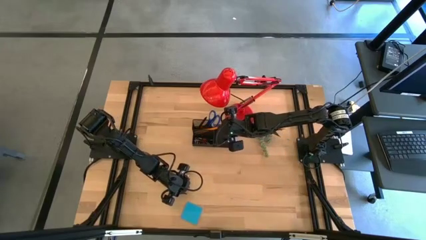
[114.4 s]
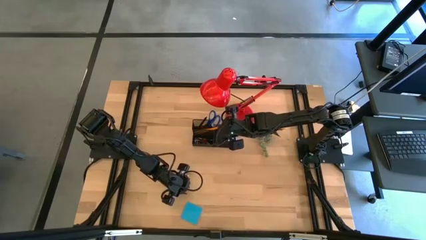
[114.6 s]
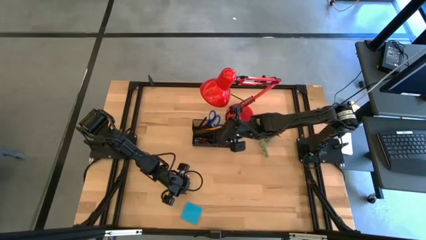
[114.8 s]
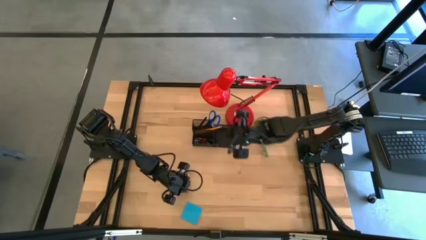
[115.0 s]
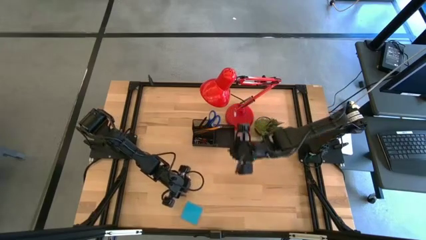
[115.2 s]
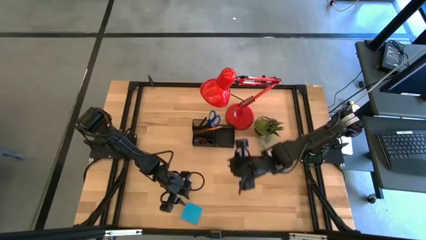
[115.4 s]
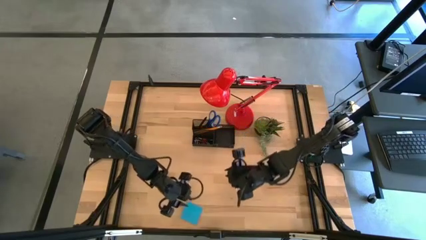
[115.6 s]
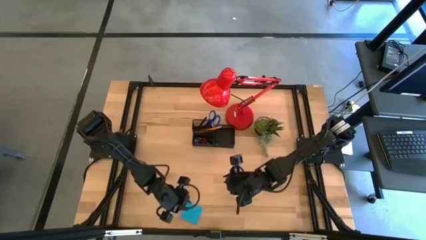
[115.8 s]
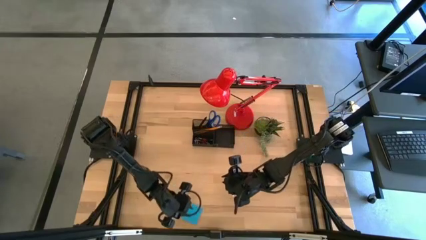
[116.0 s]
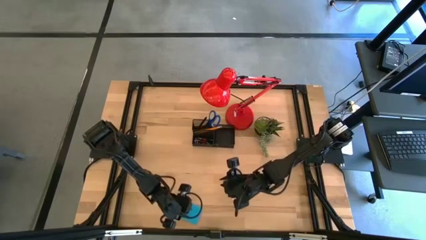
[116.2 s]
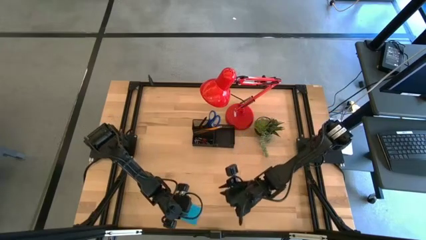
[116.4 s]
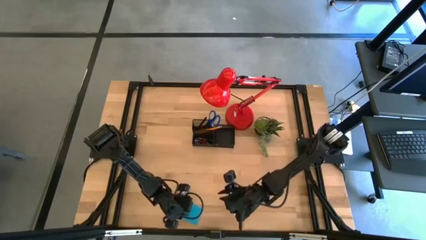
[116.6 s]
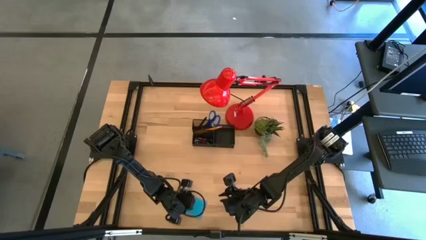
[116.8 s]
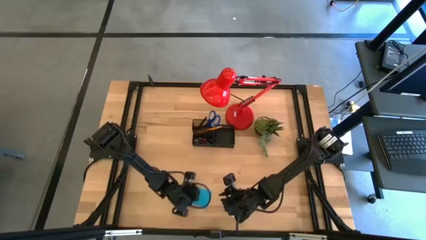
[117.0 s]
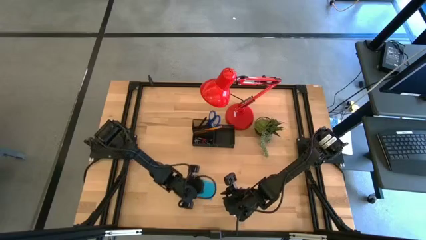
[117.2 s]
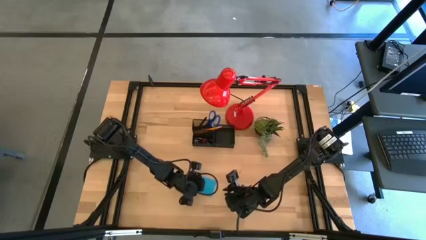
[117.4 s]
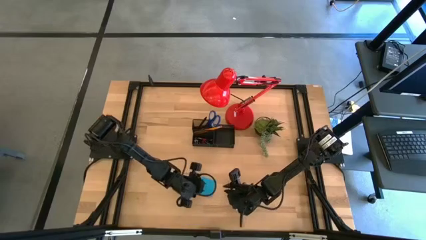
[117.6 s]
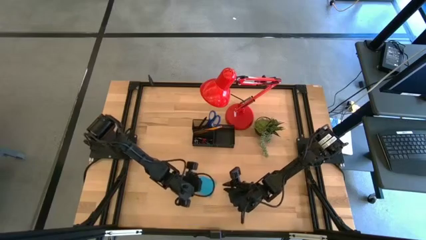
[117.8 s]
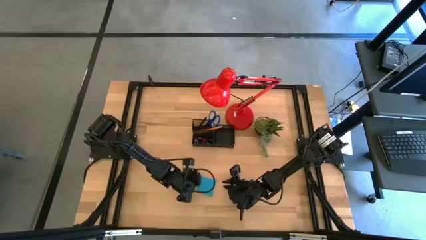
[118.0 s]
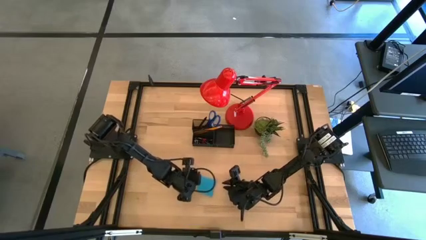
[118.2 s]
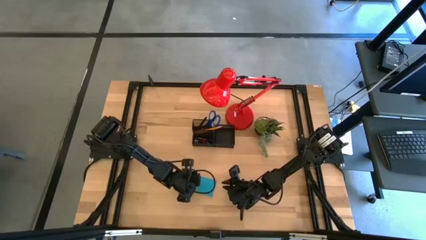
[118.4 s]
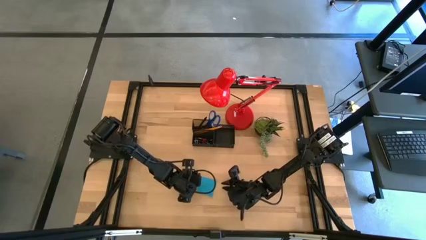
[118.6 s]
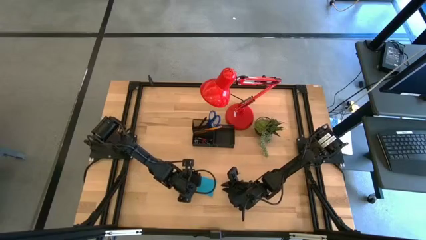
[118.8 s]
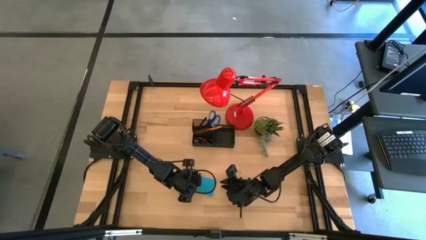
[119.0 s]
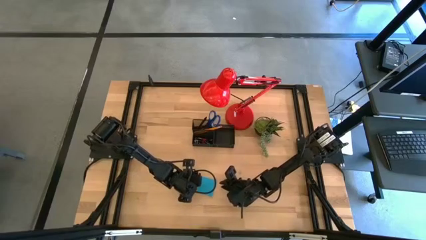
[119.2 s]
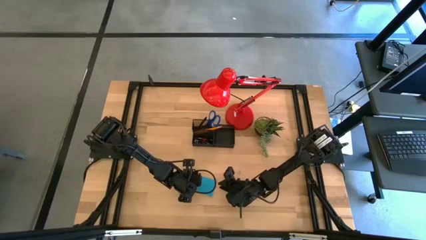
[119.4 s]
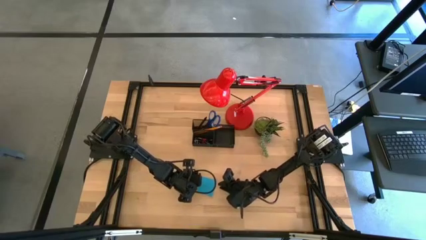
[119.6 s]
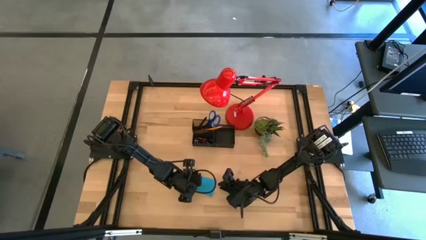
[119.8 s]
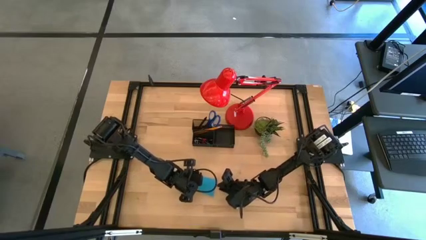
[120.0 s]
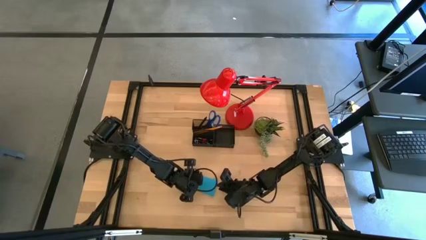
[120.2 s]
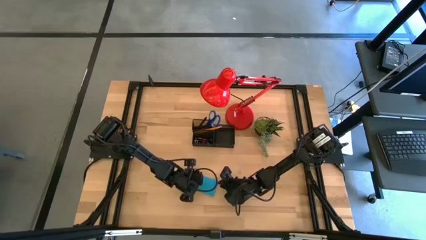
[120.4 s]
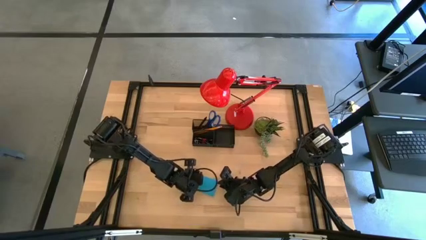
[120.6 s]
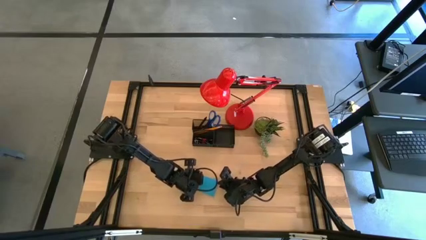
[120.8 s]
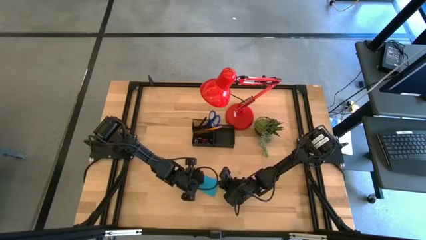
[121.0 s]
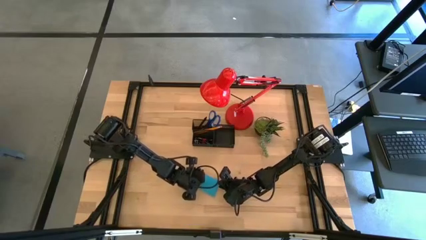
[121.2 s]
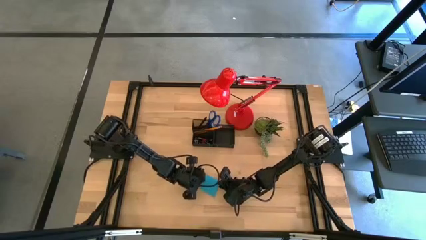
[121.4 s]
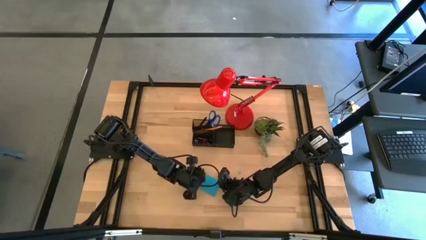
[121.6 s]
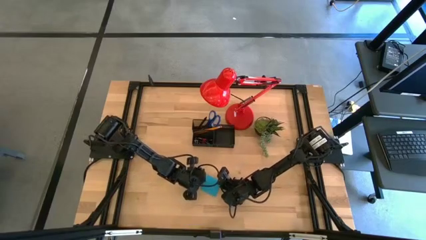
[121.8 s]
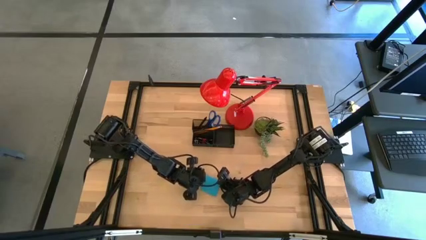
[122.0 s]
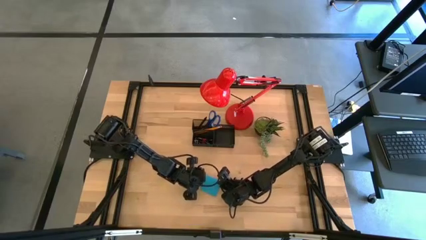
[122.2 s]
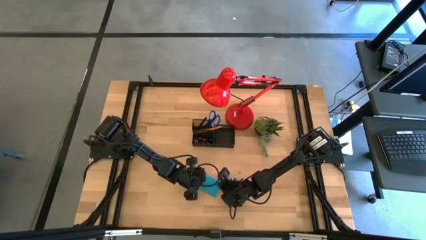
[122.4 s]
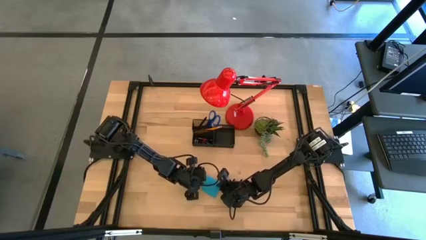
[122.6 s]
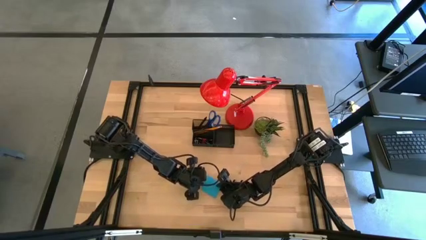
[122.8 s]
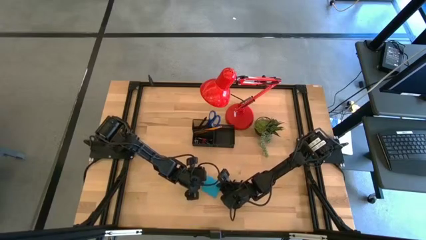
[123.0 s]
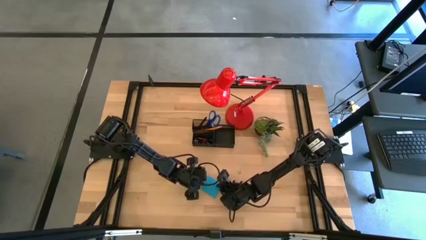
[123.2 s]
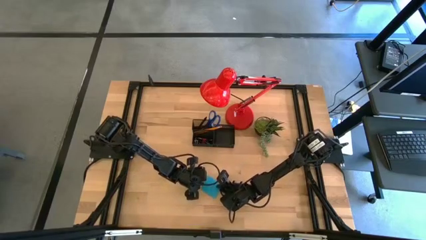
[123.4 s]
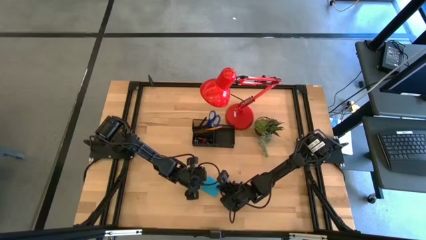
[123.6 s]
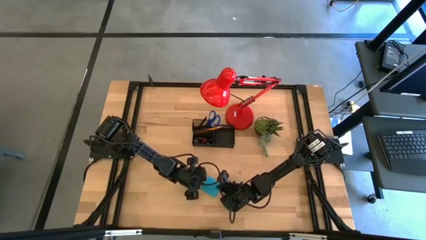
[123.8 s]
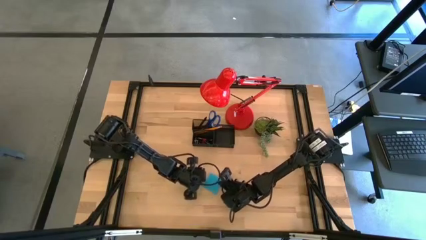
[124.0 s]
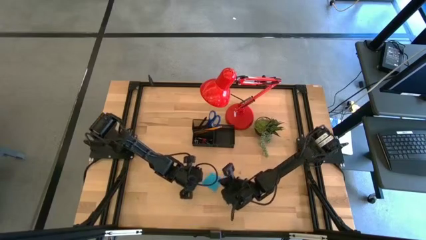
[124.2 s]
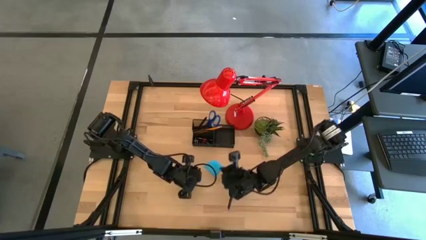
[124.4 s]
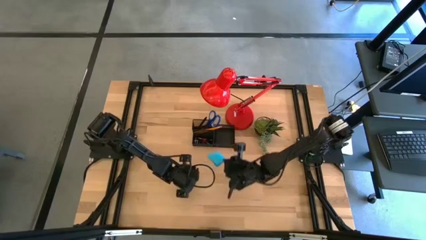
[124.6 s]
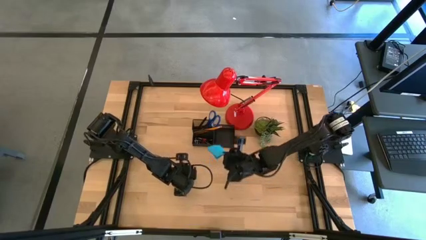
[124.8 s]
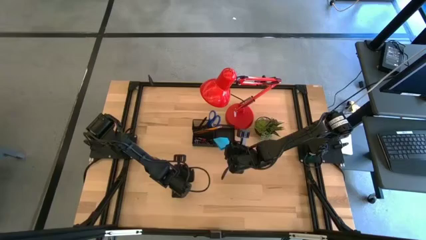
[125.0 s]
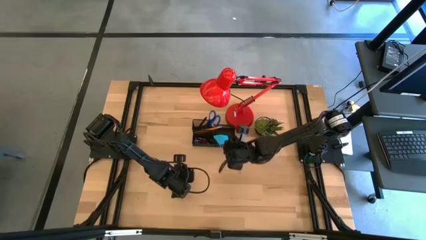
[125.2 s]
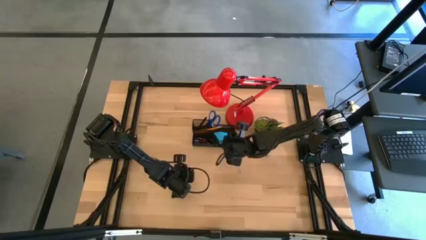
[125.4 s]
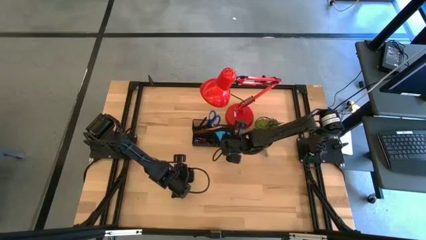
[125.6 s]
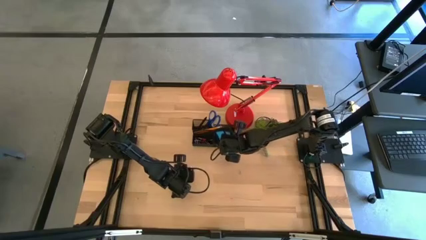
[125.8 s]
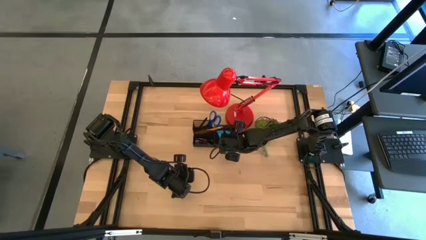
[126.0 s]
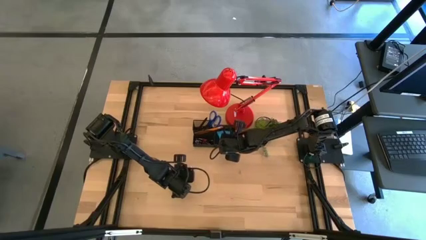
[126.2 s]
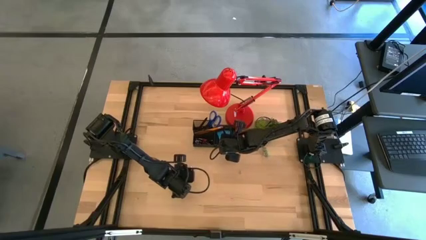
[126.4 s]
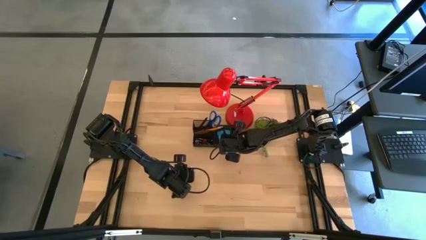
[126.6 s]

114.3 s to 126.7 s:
Task: Pick and place office supplies into organizer
Put the blue sticky notes into the black desk organizer

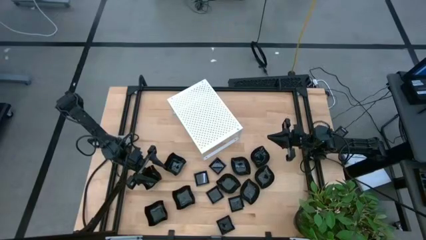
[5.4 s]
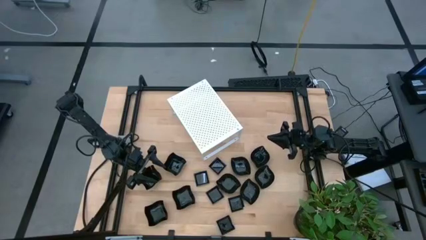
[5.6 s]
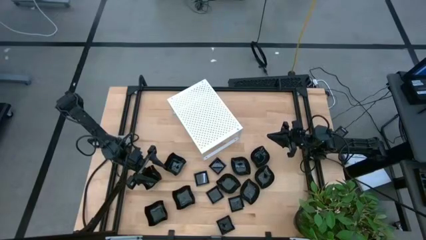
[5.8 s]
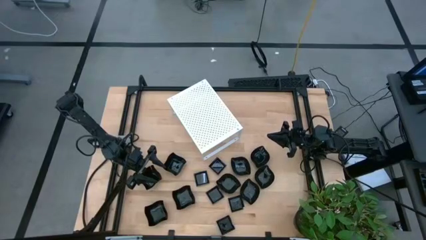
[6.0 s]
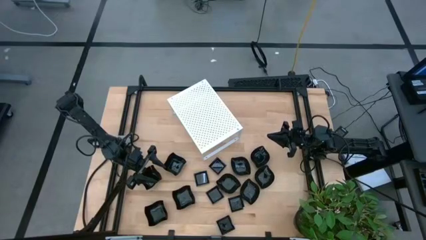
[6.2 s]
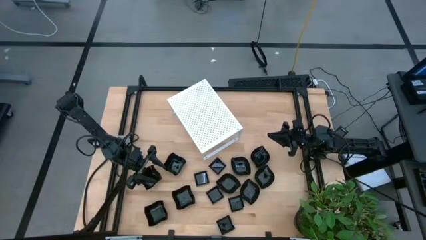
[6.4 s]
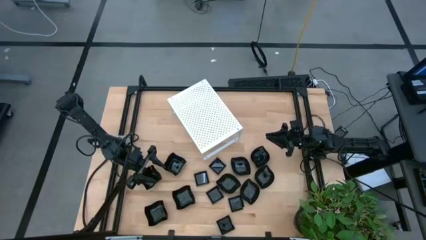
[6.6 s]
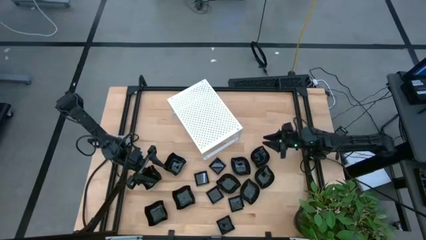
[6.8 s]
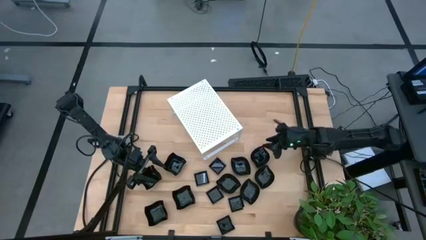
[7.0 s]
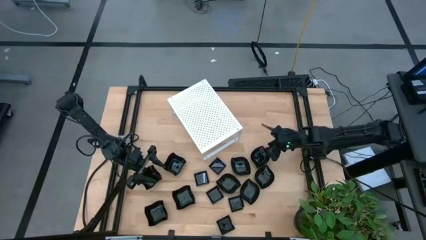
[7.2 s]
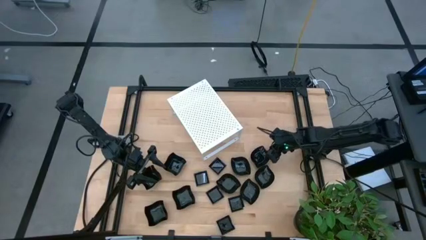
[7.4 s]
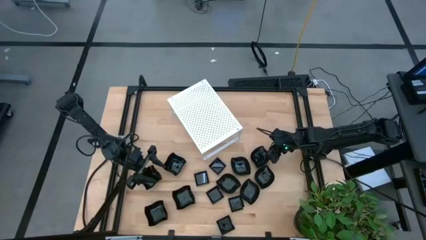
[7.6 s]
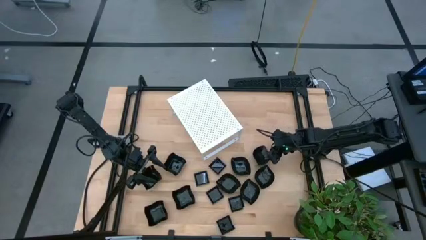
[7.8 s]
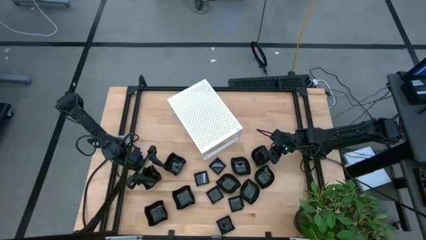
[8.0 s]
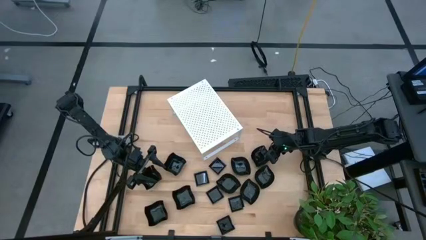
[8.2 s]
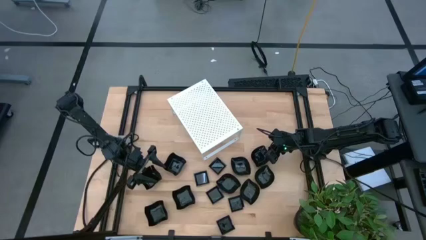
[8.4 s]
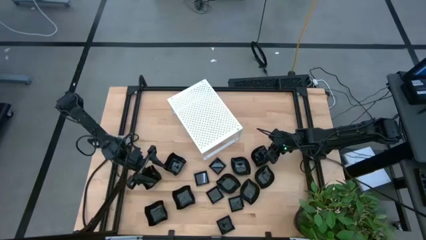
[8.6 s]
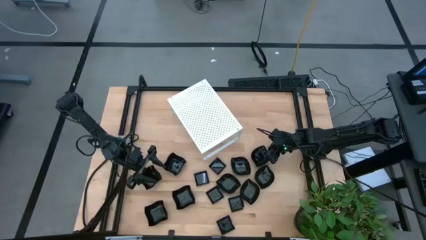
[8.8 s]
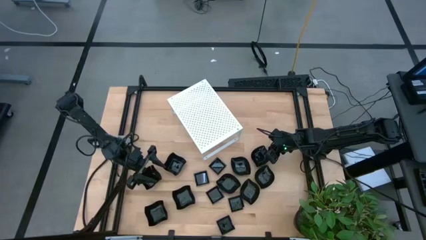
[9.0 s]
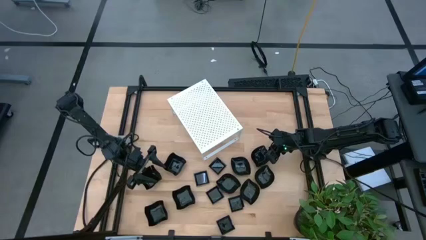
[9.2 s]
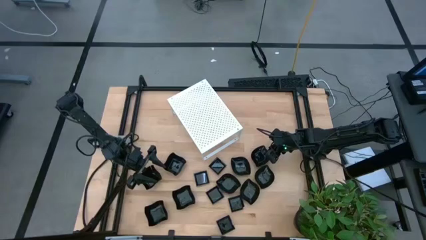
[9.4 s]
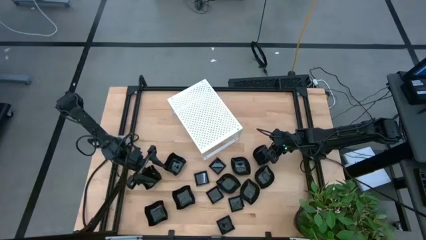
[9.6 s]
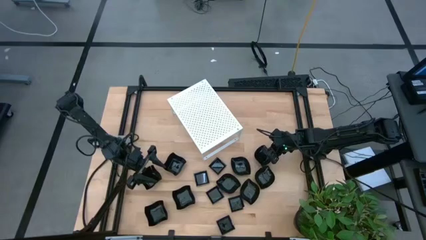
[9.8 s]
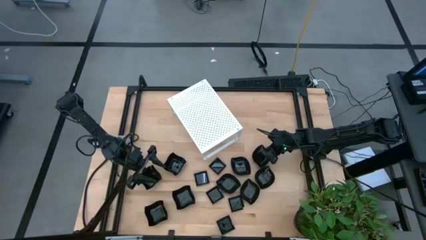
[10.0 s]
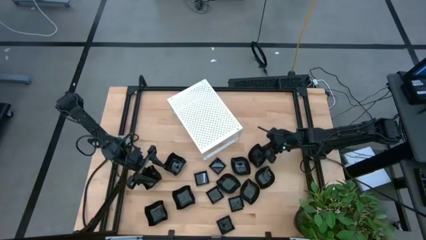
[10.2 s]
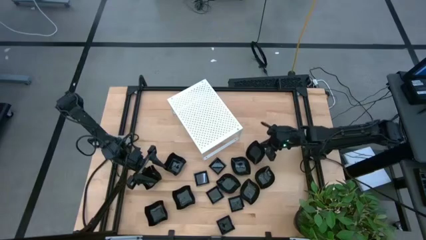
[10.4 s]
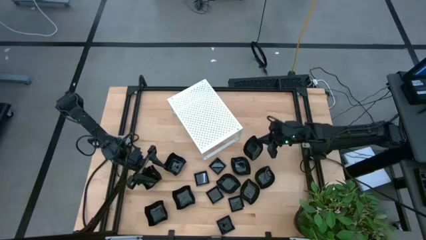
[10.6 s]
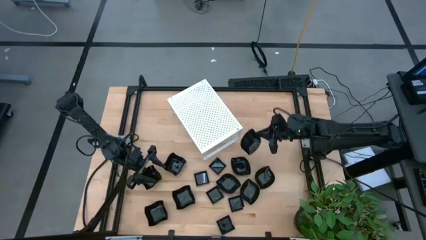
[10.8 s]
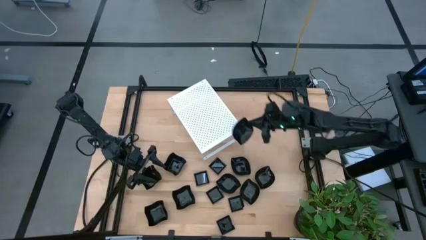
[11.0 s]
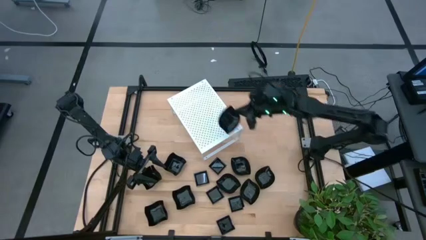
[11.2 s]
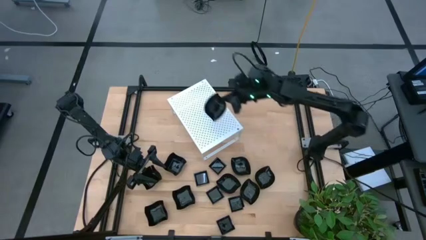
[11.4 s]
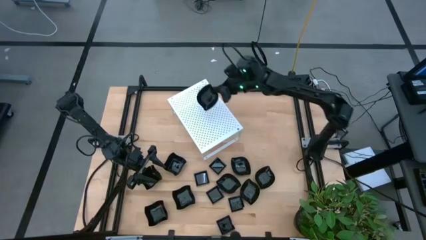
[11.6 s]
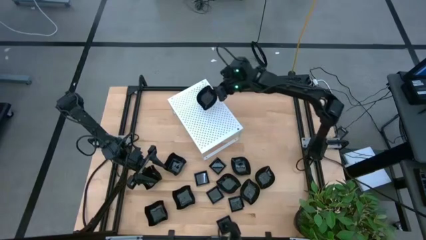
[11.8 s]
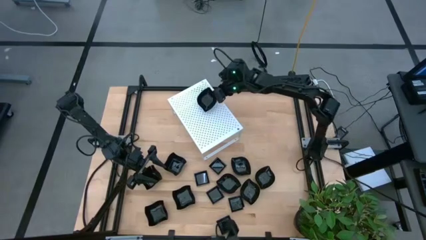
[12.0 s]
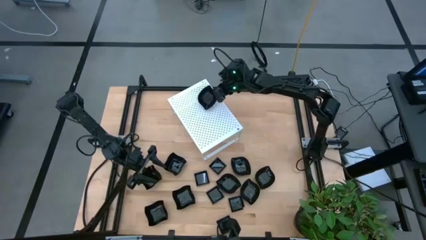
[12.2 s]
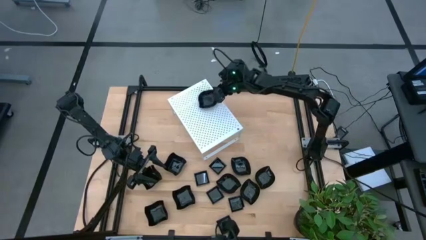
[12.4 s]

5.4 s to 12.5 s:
Task: Pick & Place Mini shaped plates
Put the leaf-shaped plate on the shelf
